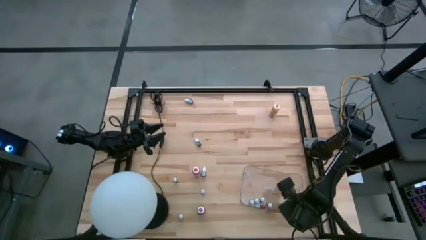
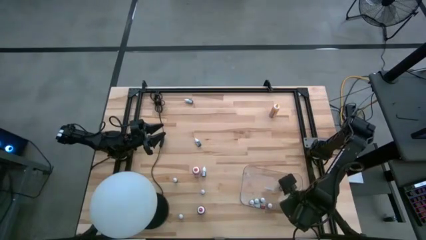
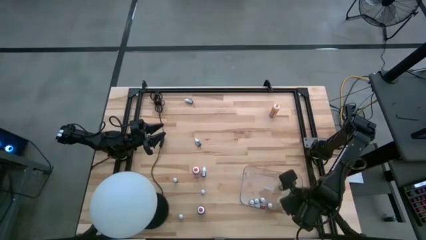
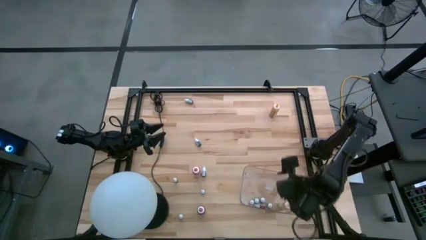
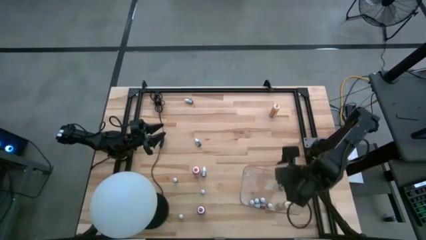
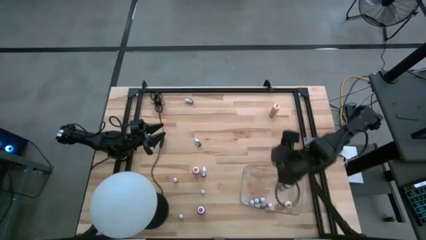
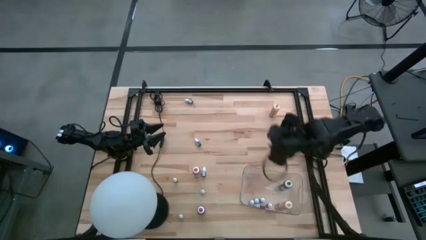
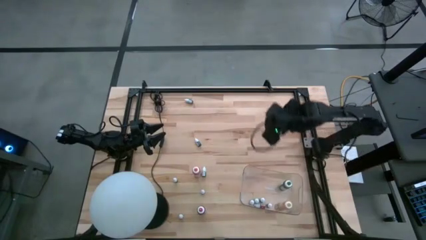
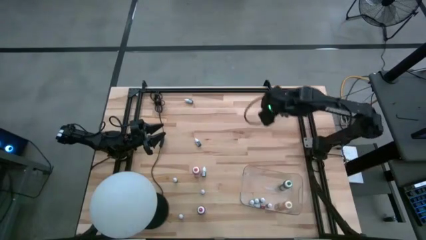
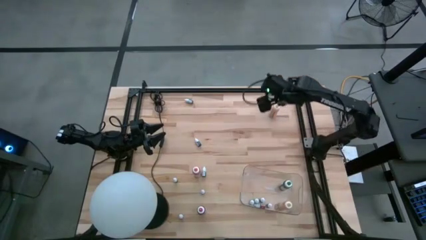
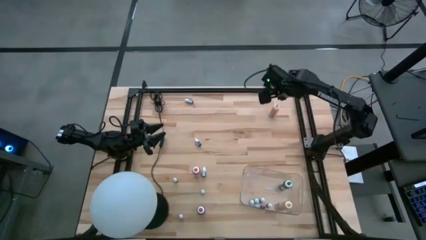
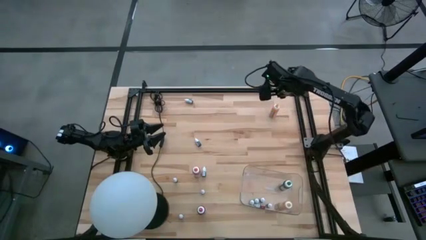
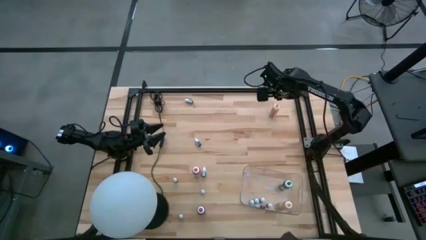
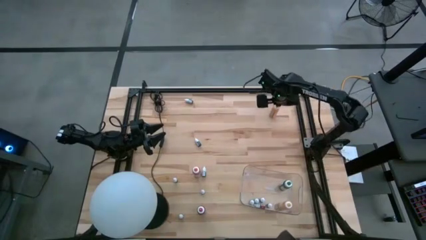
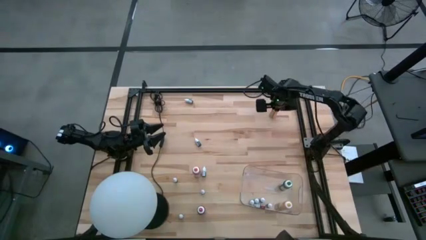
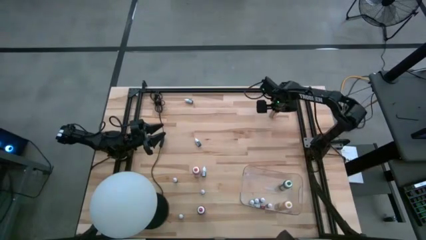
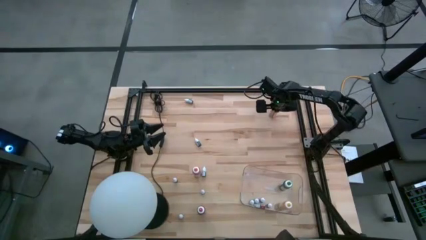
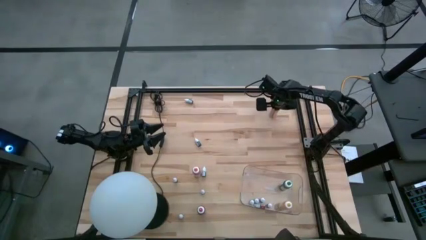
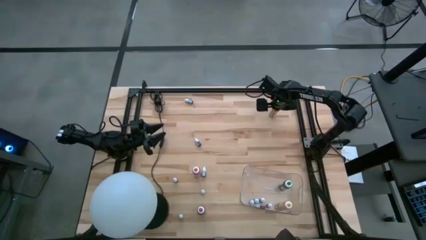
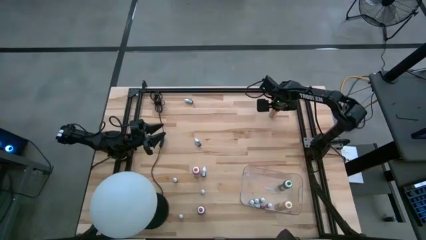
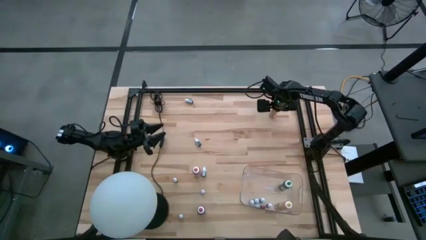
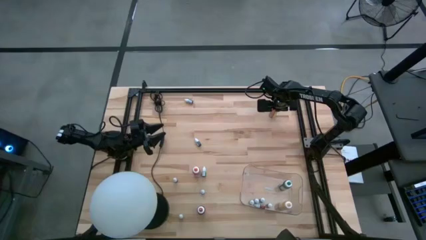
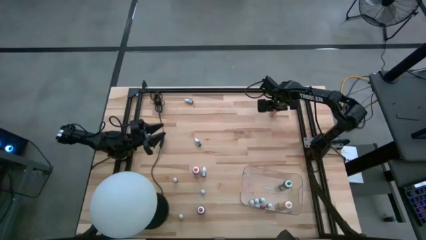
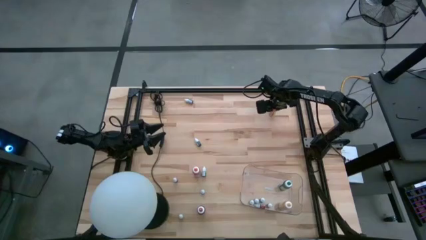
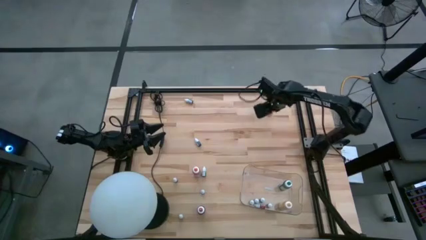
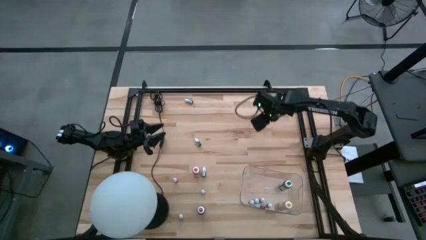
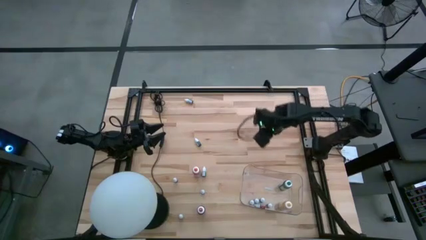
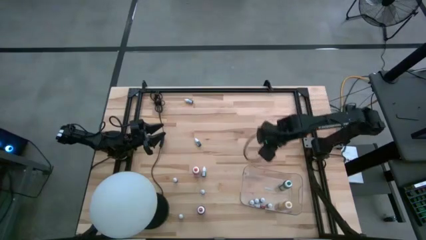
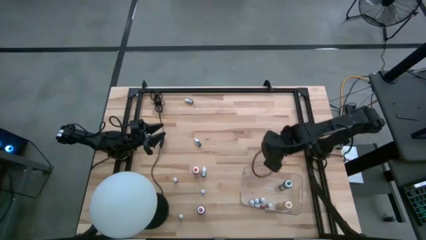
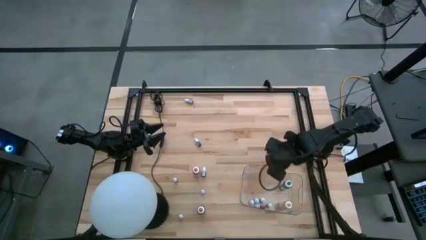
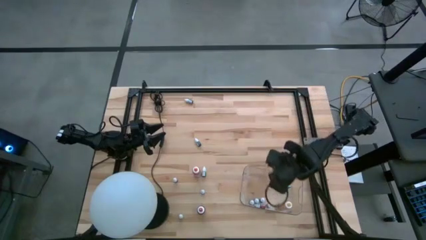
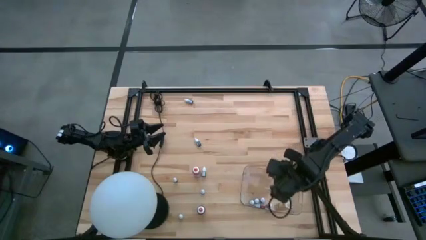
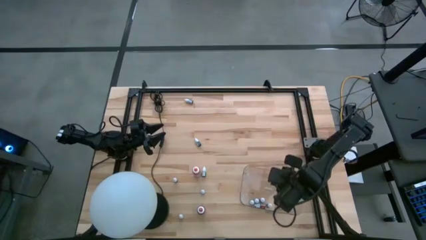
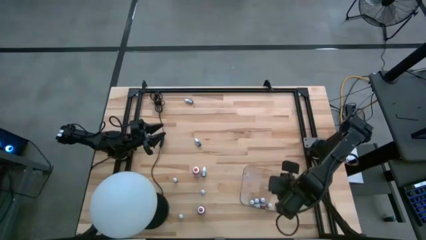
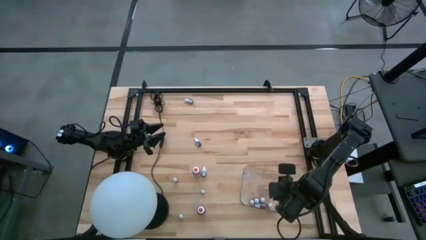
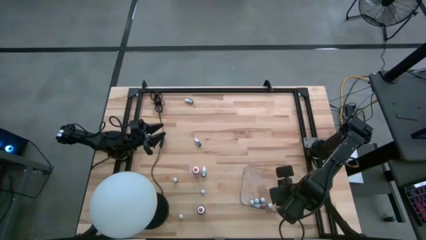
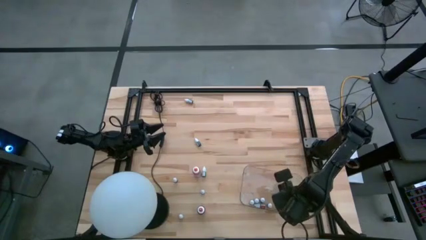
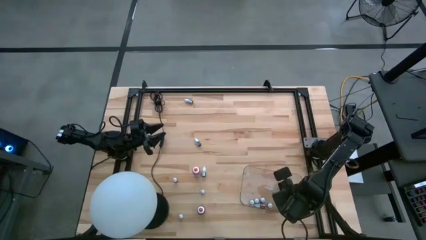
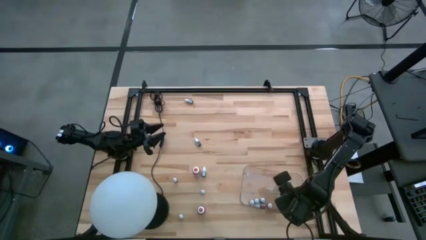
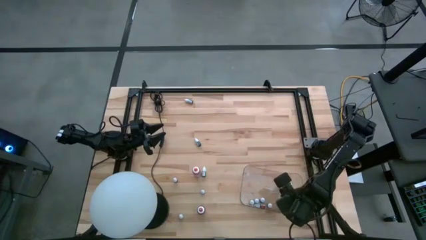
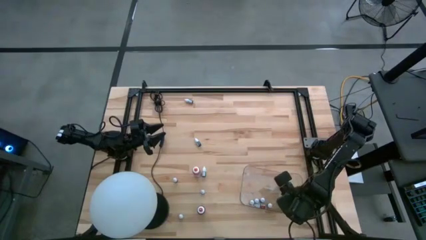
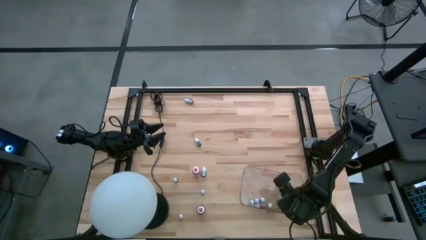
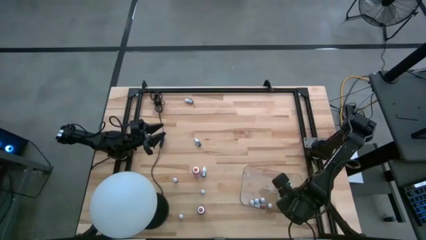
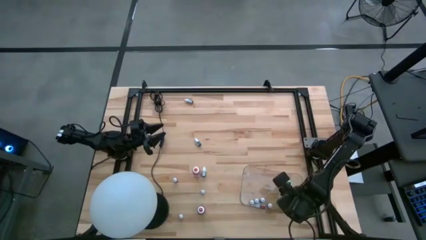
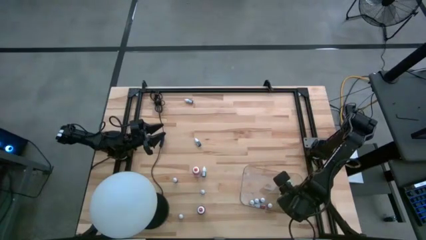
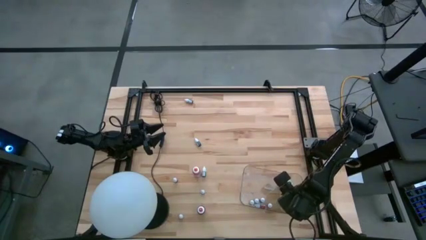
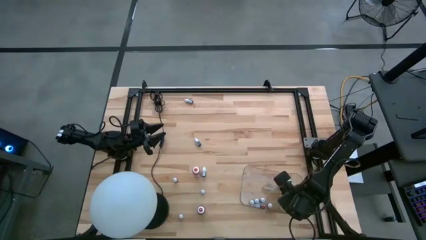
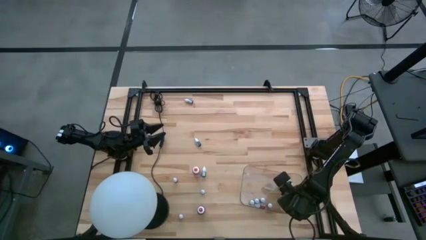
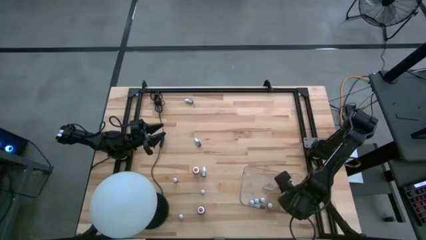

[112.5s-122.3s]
Task: Pick & Place food coloring
Put the yellow food color into the transparent bin

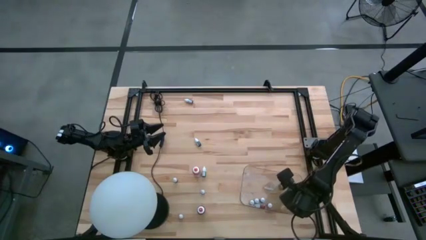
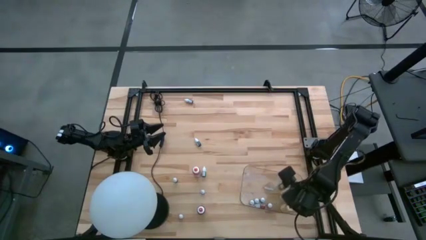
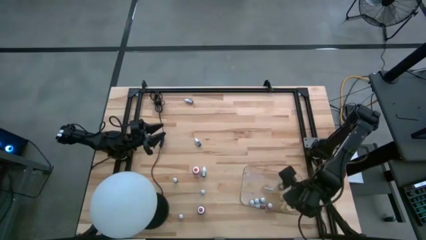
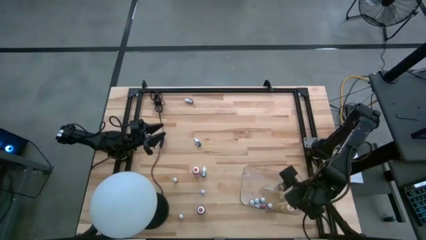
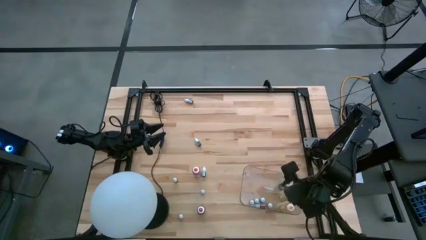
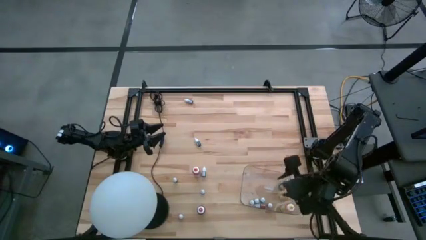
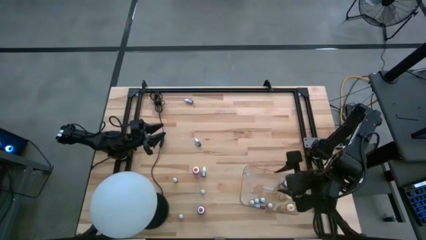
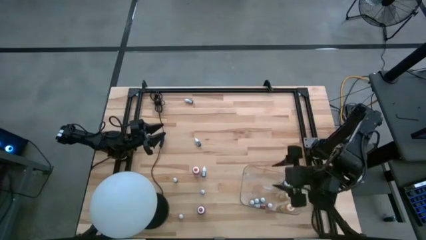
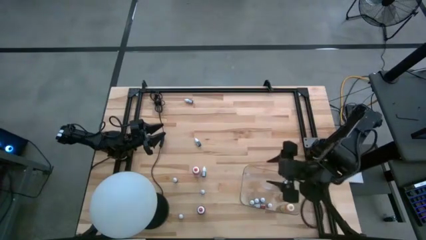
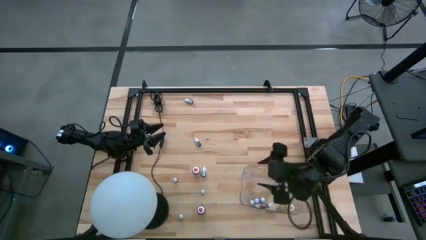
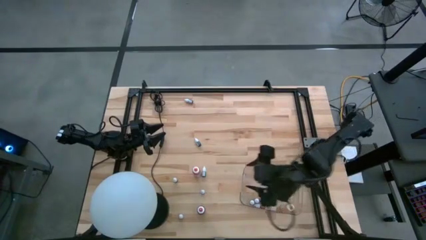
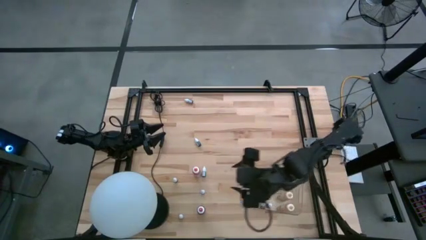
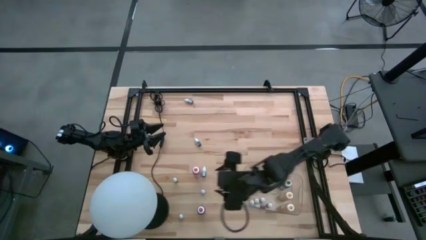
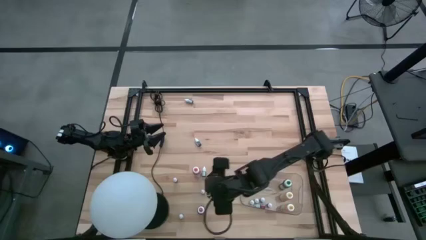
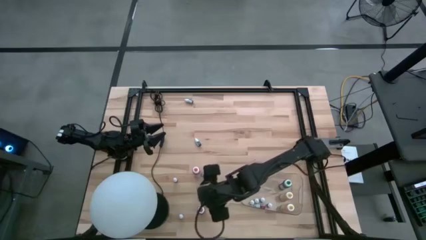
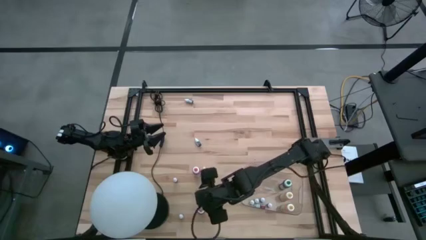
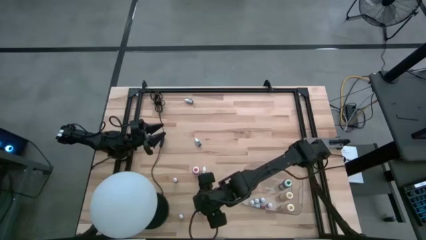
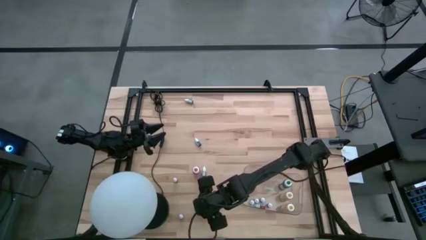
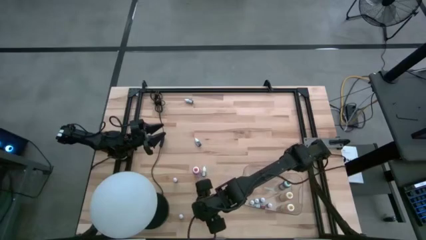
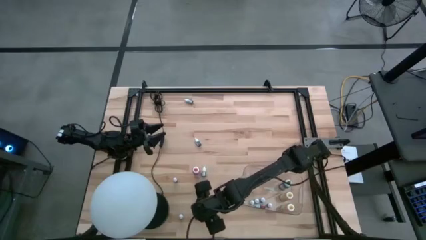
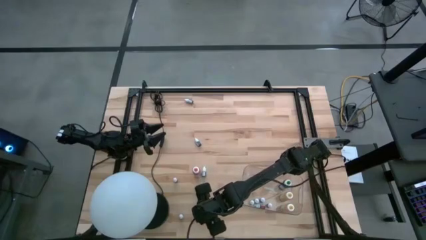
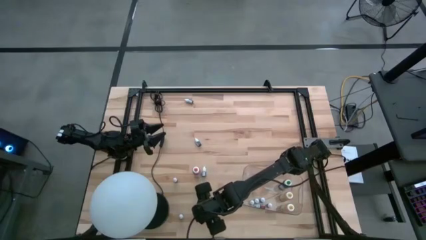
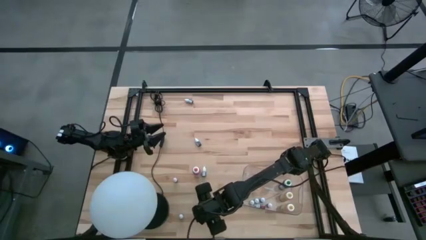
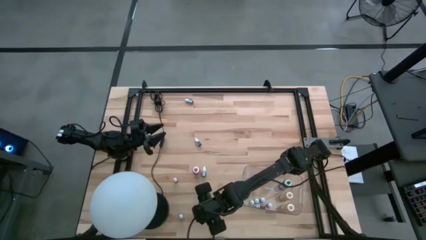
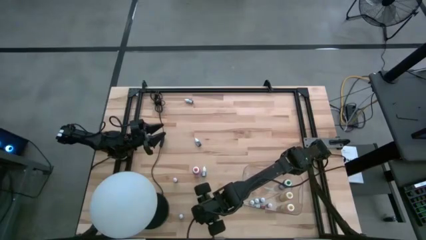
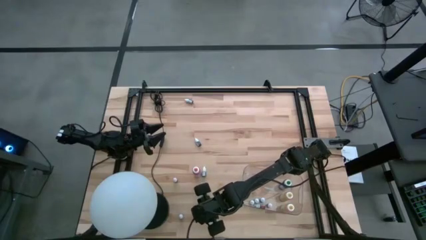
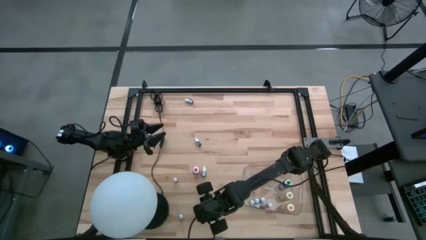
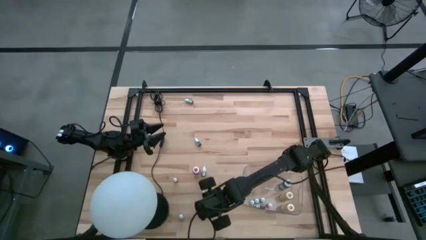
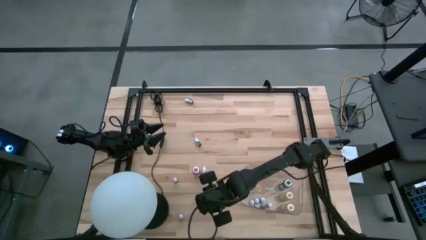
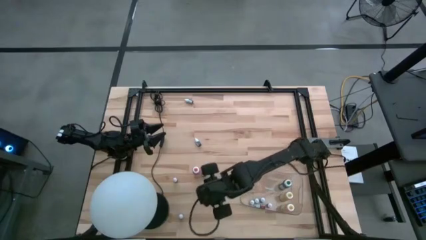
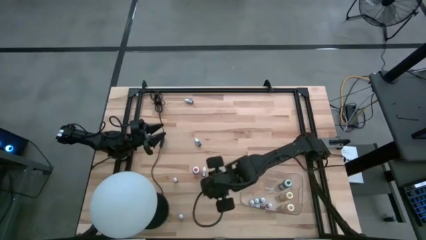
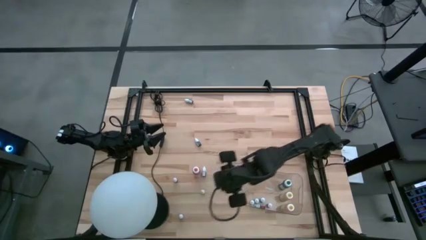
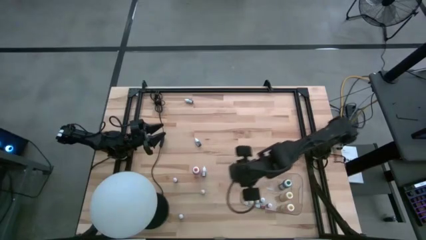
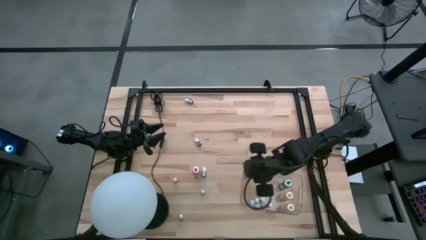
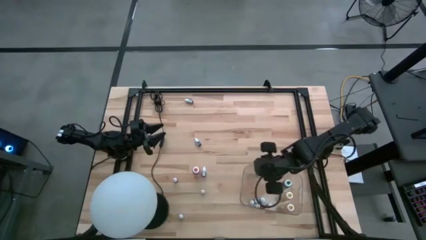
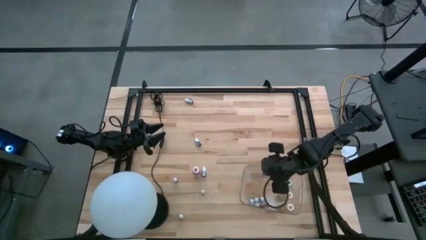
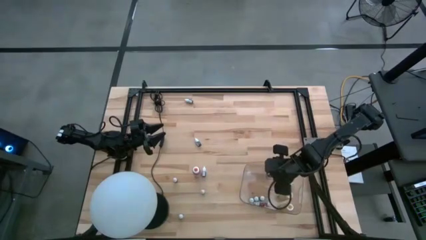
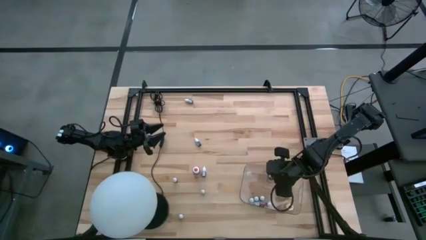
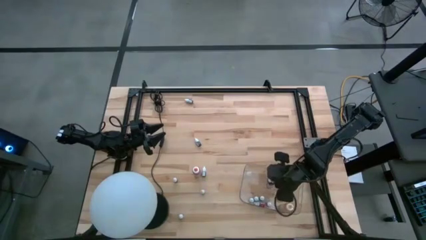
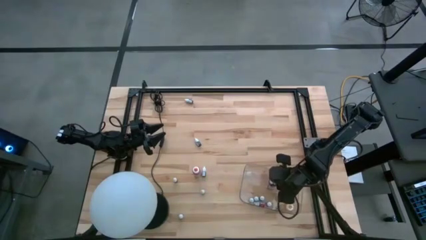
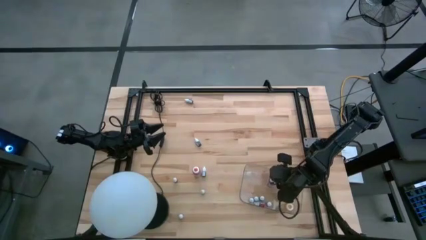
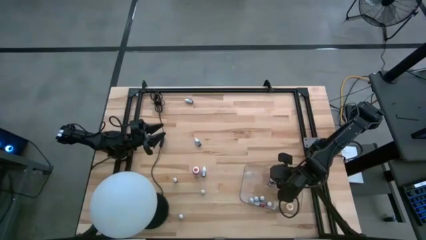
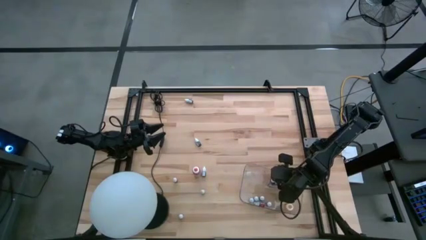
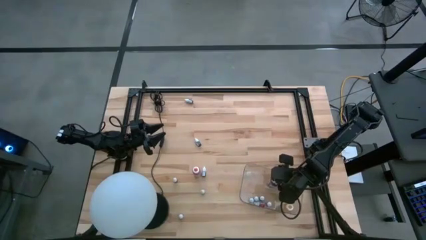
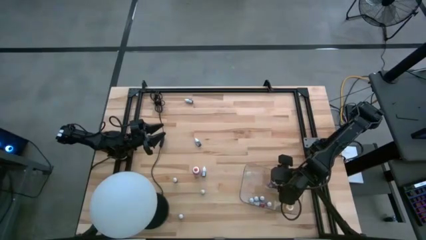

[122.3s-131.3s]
Put the bottom center red food color into the transparent bin
